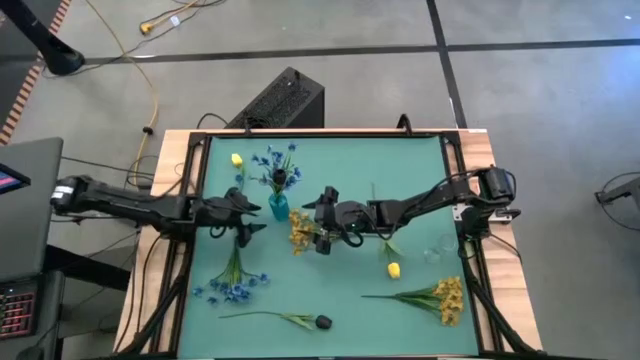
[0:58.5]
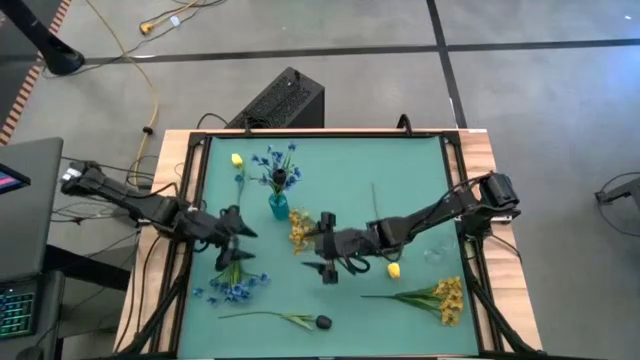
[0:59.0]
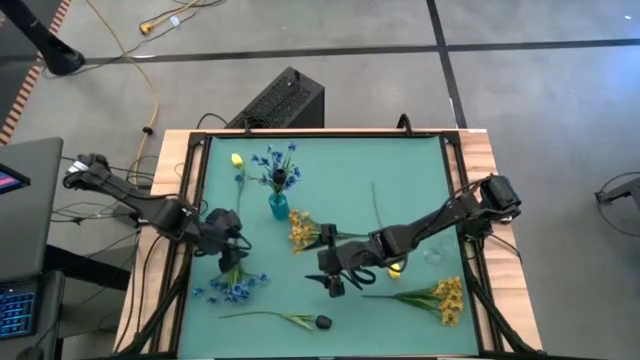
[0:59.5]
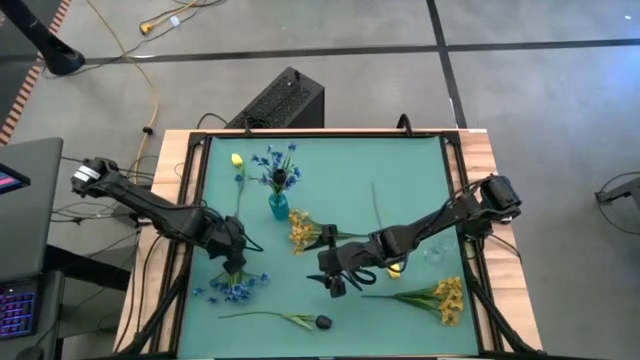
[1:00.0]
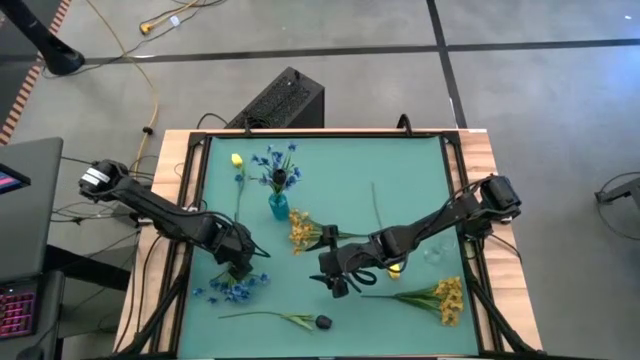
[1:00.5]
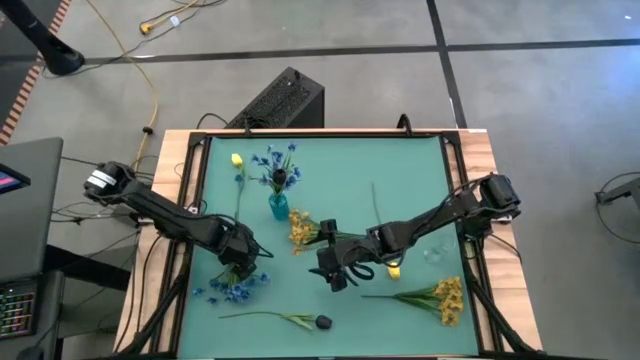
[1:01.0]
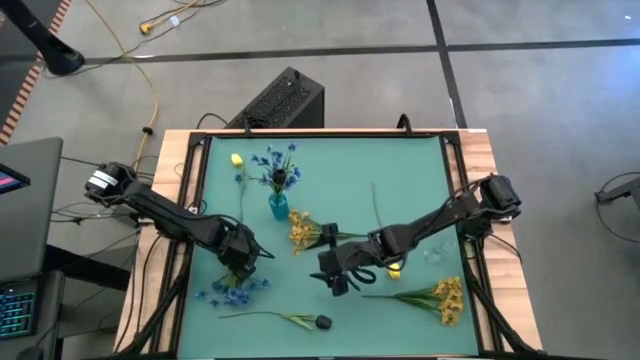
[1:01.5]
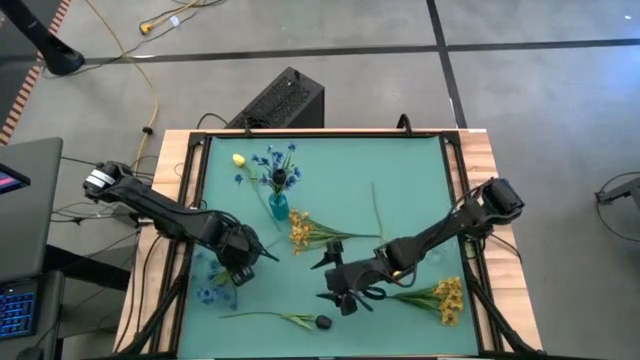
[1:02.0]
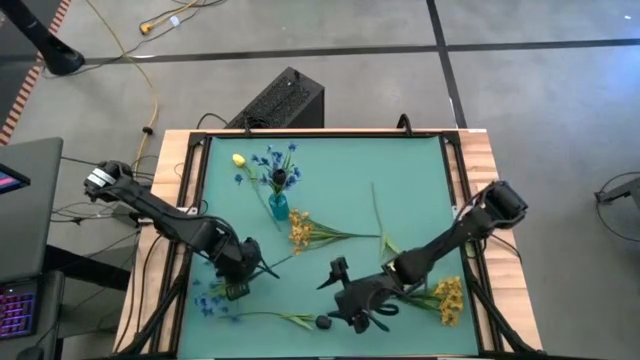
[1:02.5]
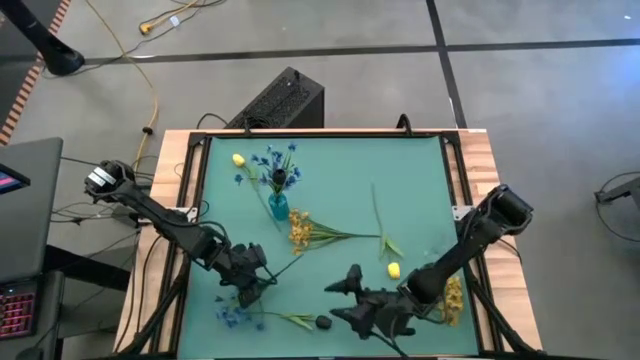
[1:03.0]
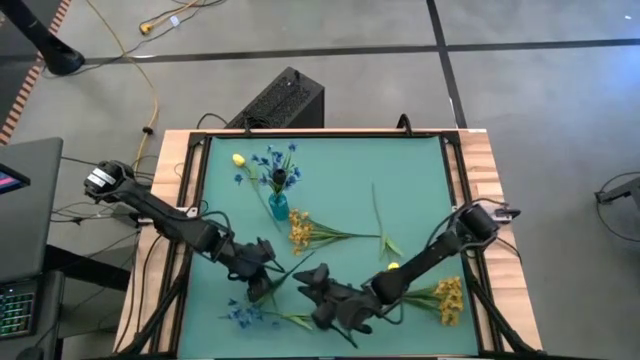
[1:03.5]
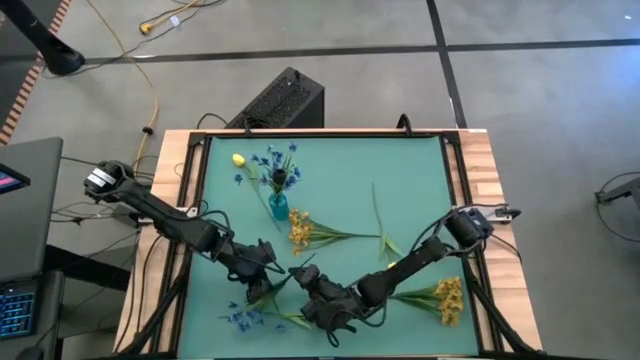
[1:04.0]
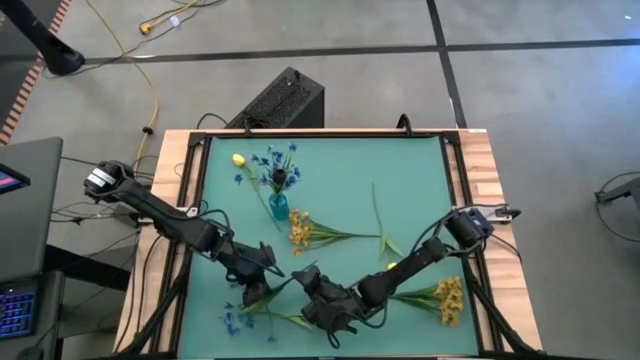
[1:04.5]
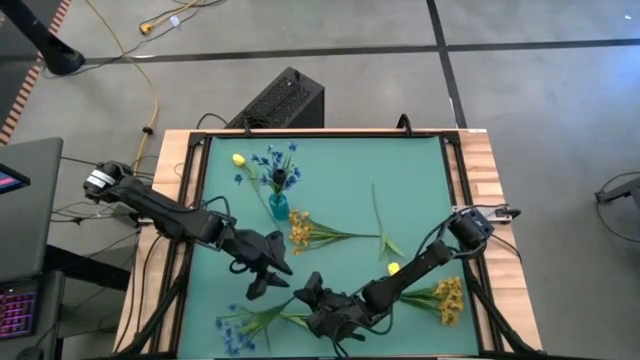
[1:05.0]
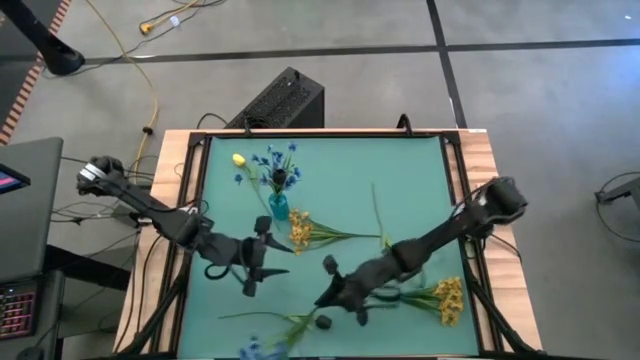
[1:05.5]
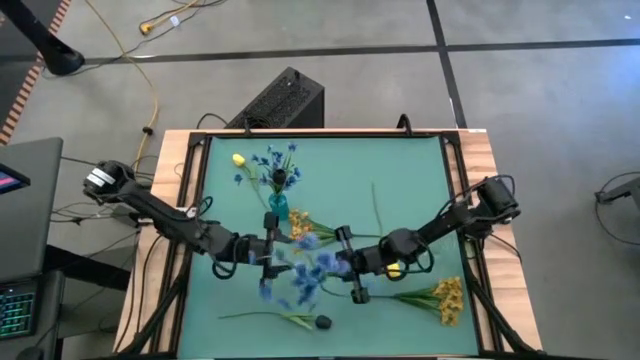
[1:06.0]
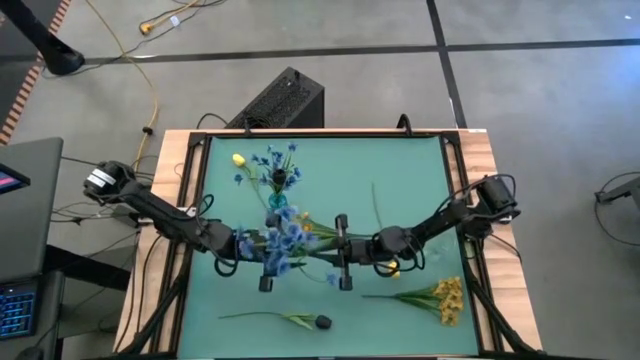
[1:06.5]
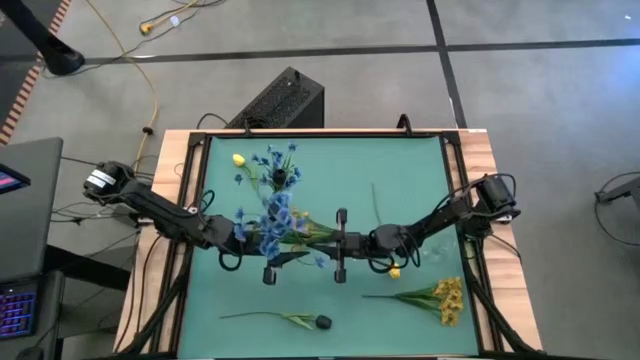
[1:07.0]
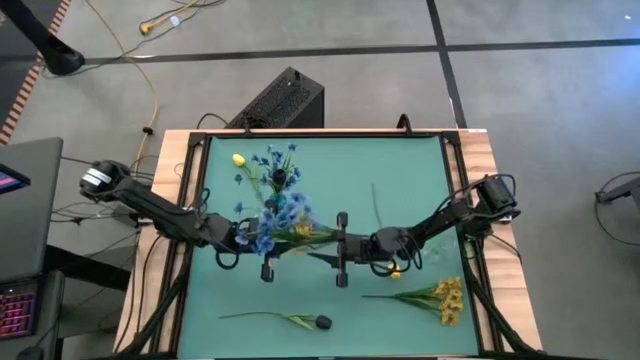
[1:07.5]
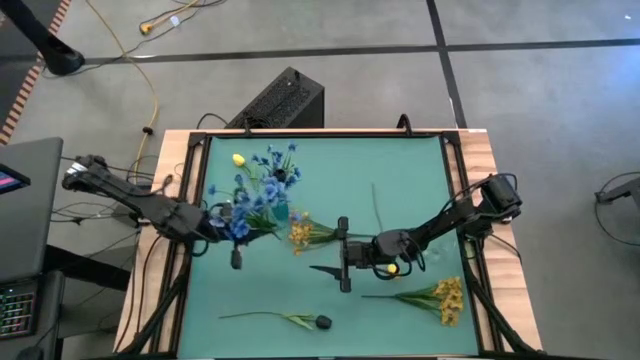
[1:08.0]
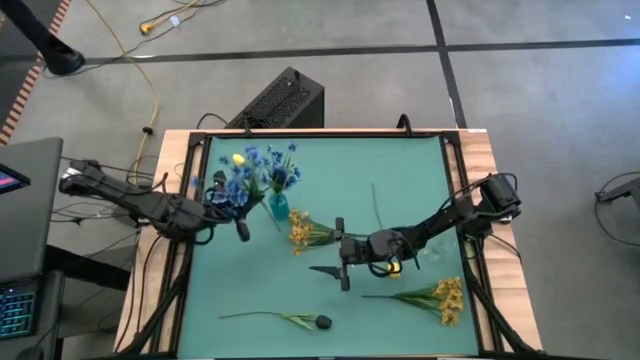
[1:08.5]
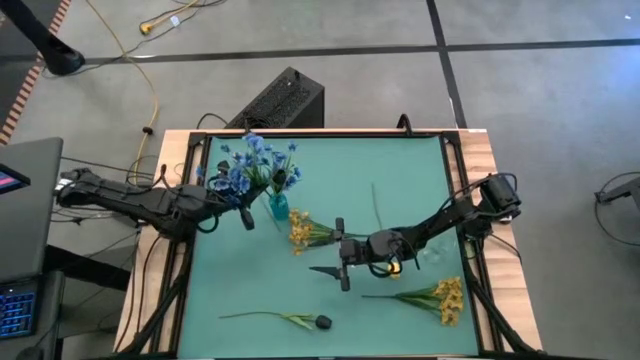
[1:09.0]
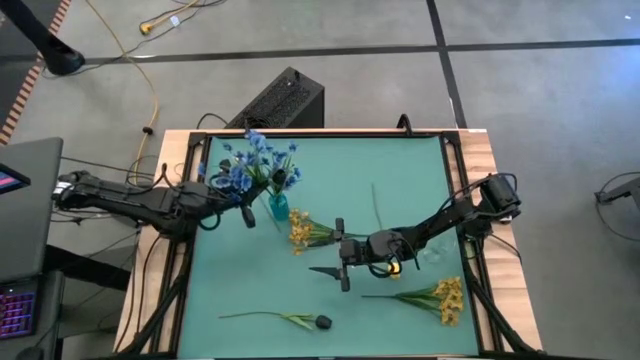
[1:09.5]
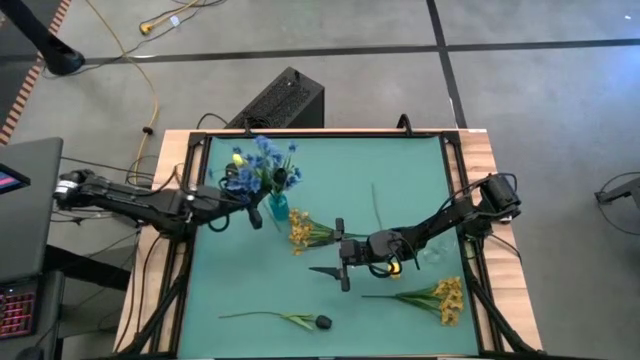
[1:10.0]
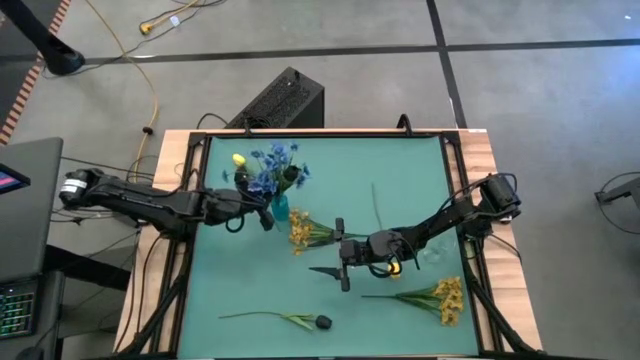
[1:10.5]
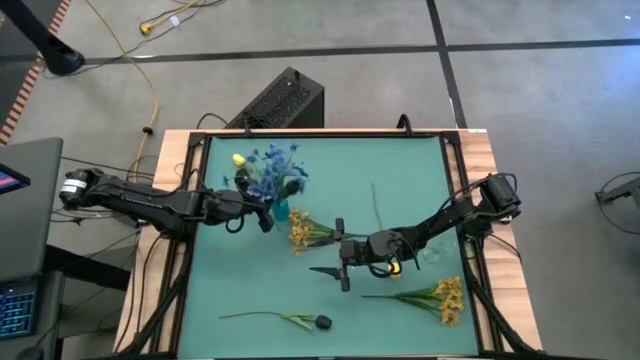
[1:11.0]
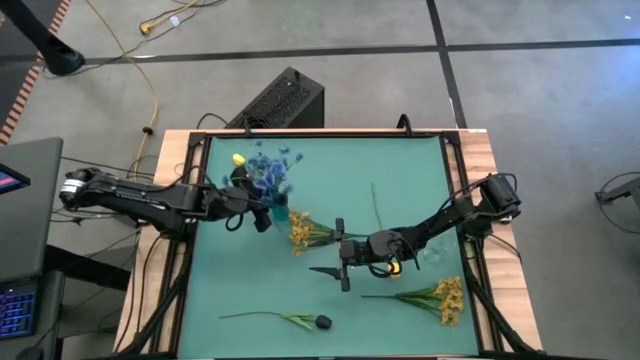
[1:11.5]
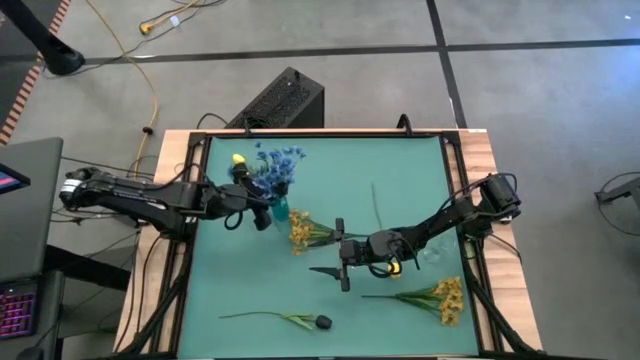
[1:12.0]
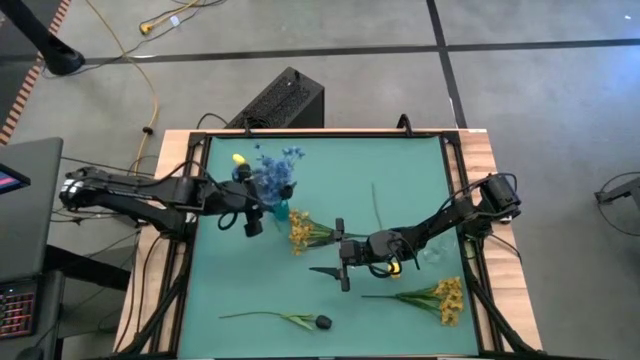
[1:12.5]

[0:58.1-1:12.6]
Task: Sort flowers into vase by color
Put the blue flowers into the blue vase

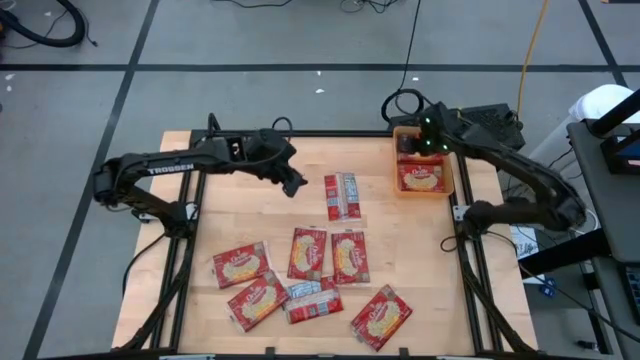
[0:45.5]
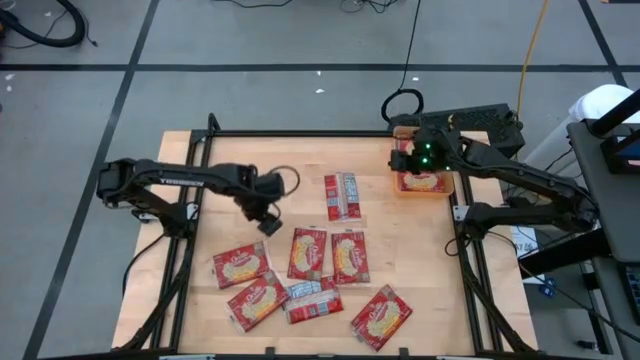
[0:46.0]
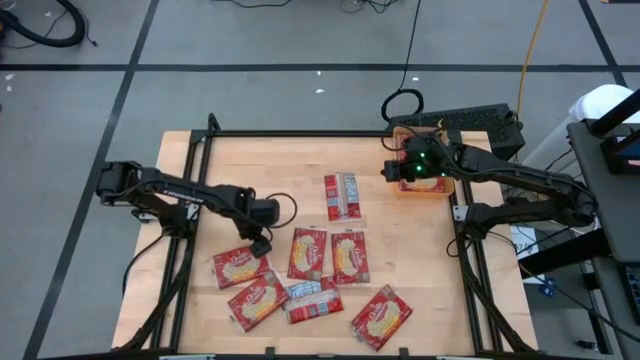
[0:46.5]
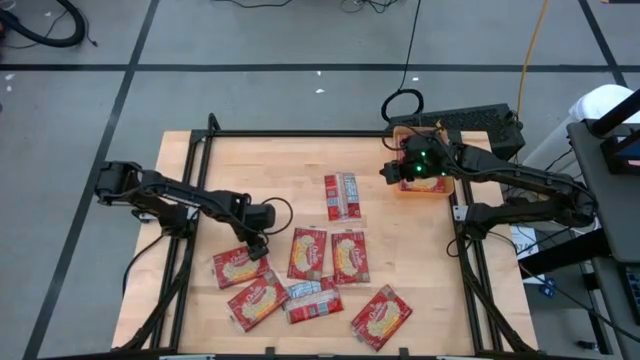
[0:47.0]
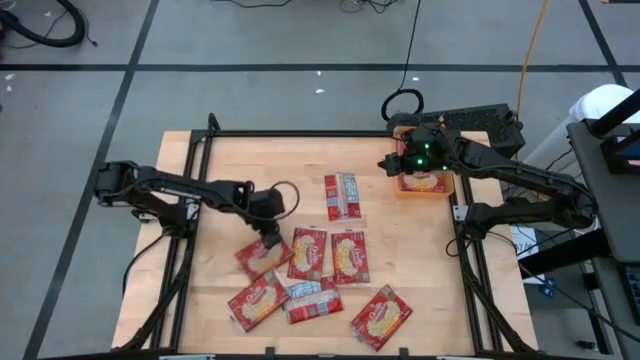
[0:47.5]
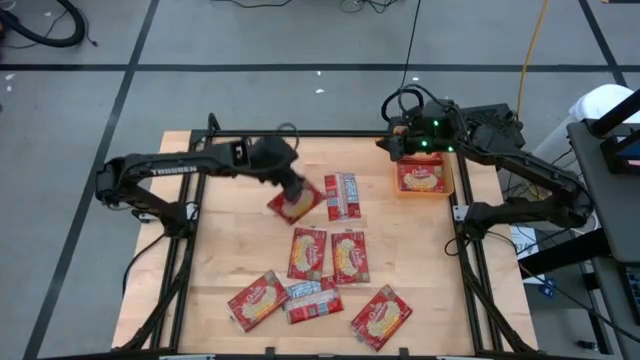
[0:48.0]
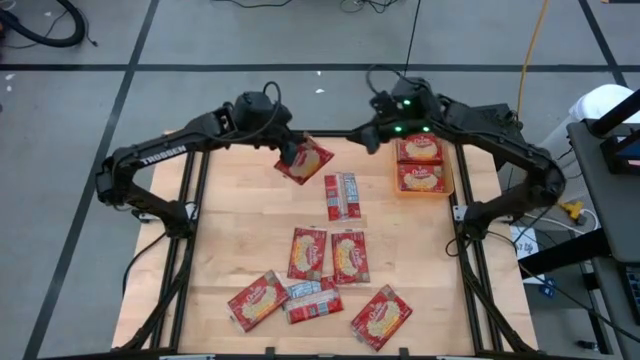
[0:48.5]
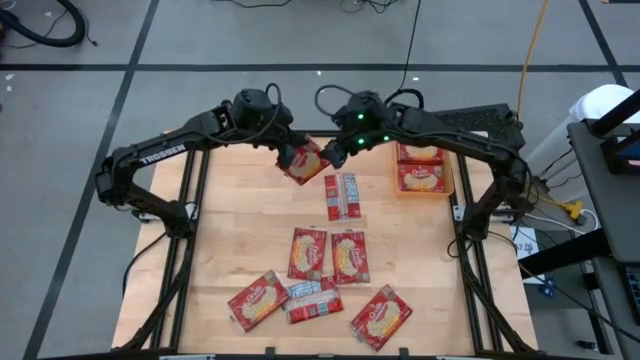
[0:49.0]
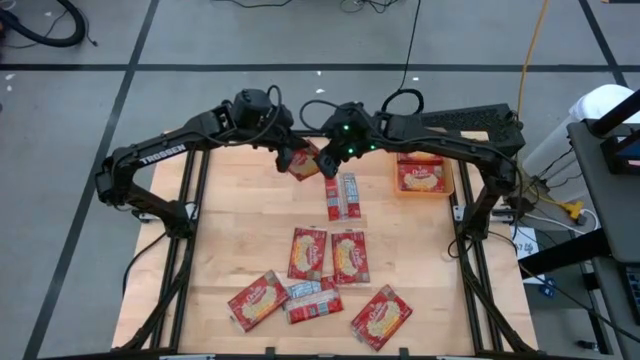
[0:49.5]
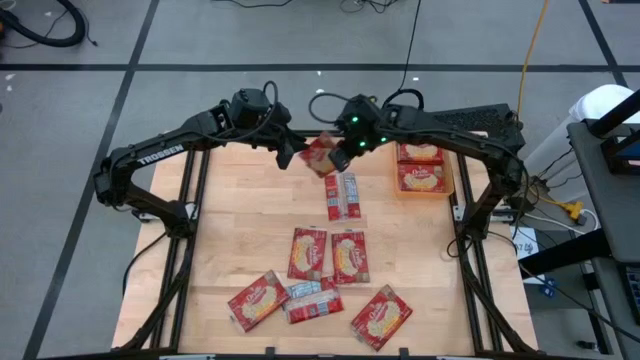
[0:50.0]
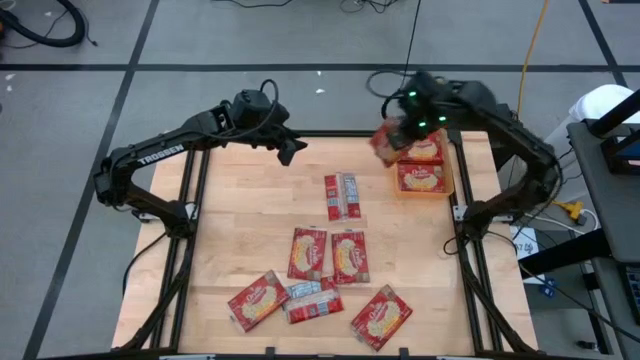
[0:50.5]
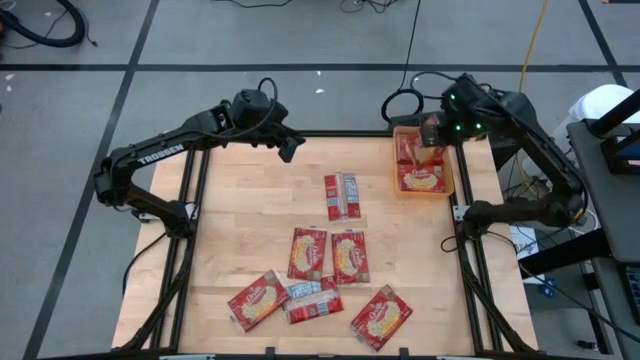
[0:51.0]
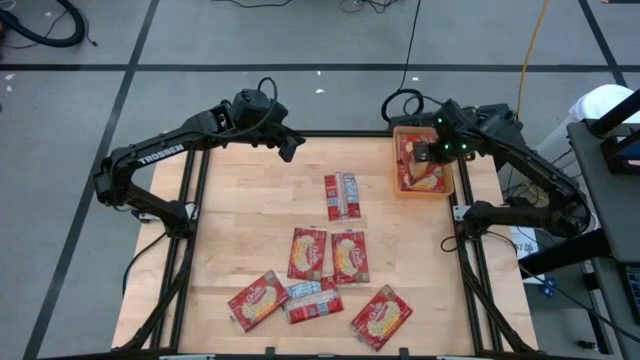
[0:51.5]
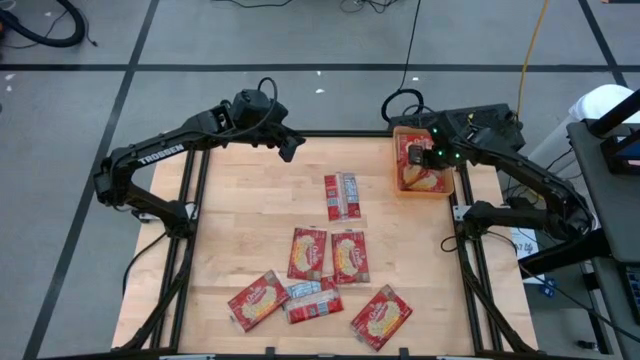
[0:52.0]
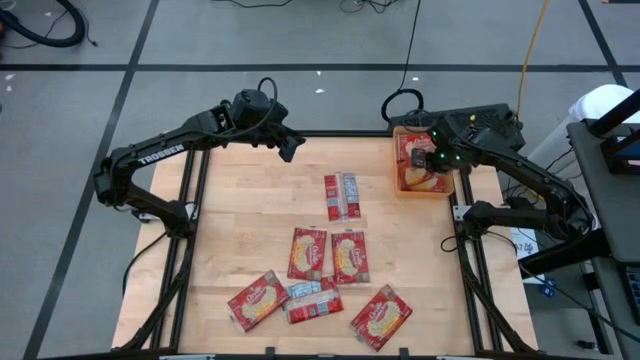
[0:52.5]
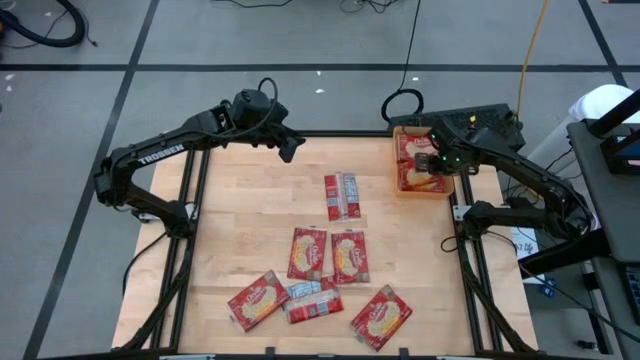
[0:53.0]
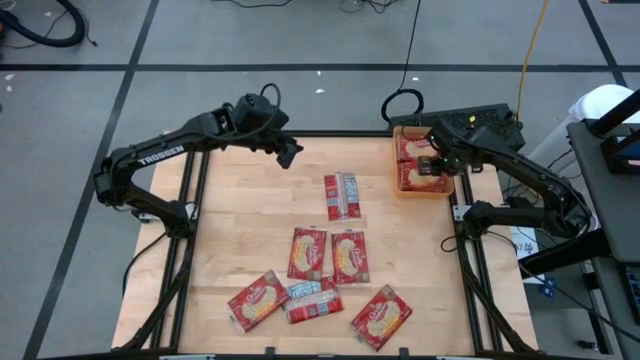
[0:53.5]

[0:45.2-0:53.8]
Task: Sort popcorn bags into baskets
Put the red popcorn bag into the orange bin
